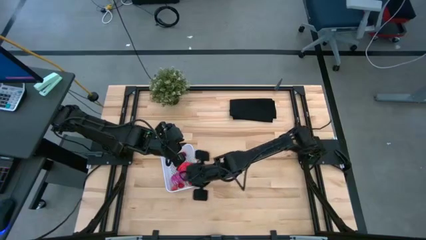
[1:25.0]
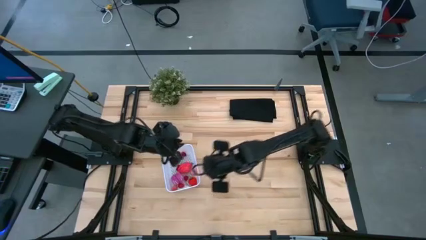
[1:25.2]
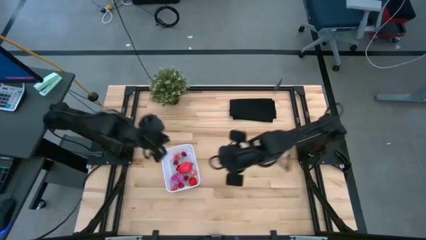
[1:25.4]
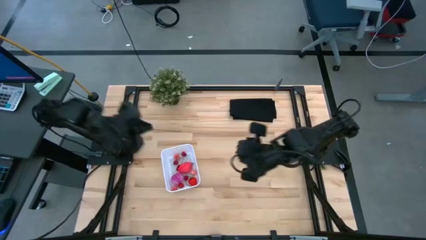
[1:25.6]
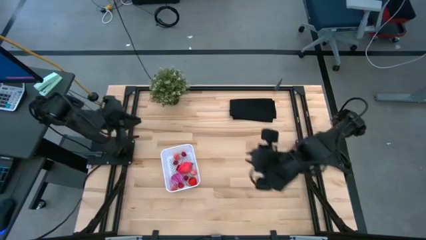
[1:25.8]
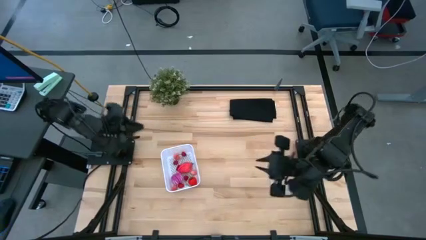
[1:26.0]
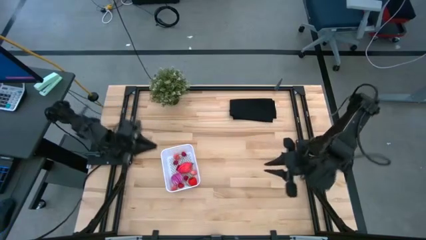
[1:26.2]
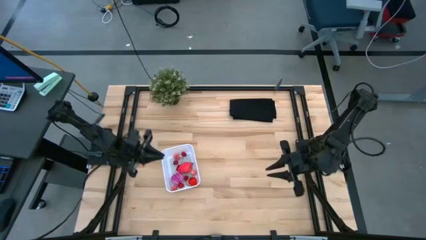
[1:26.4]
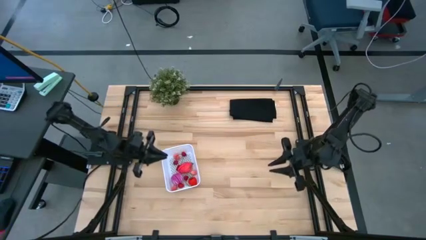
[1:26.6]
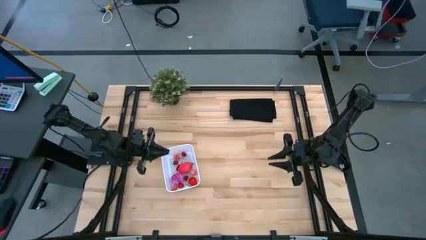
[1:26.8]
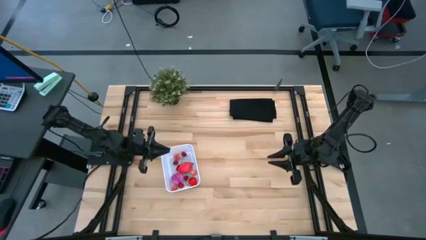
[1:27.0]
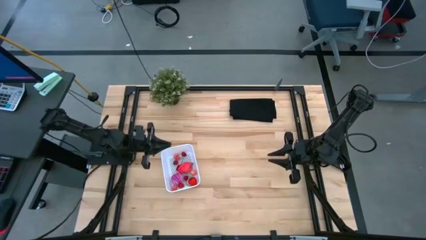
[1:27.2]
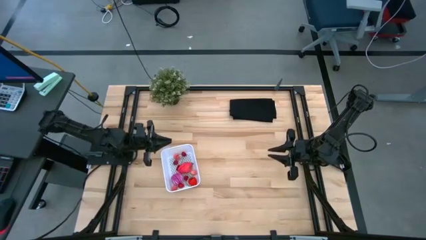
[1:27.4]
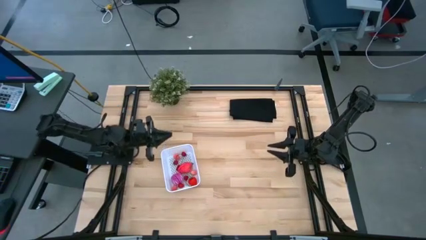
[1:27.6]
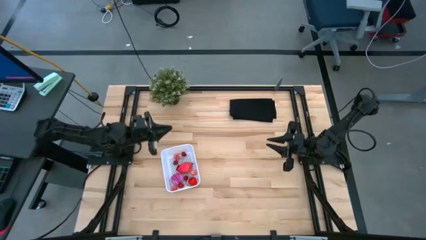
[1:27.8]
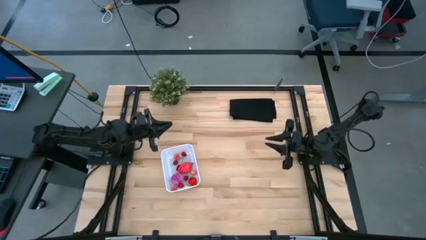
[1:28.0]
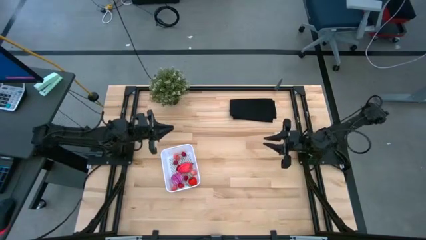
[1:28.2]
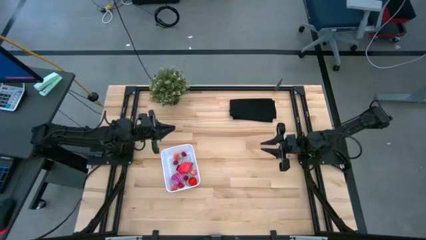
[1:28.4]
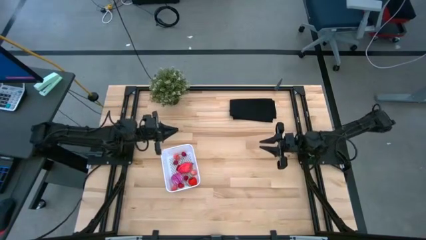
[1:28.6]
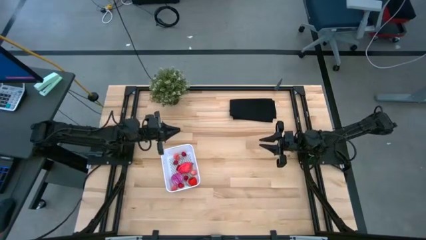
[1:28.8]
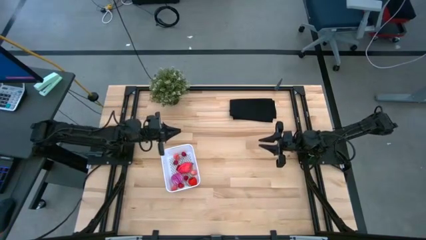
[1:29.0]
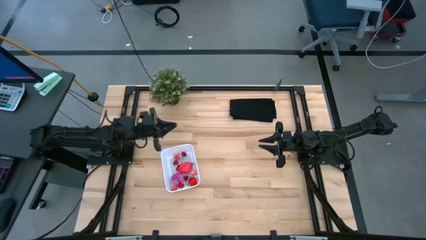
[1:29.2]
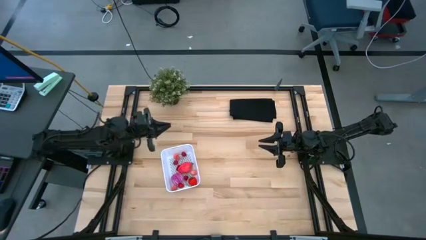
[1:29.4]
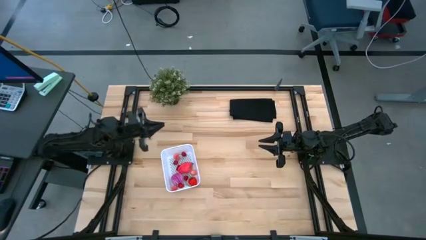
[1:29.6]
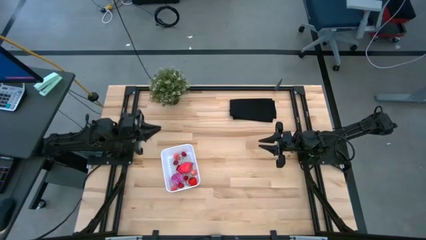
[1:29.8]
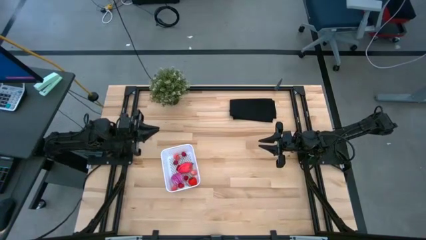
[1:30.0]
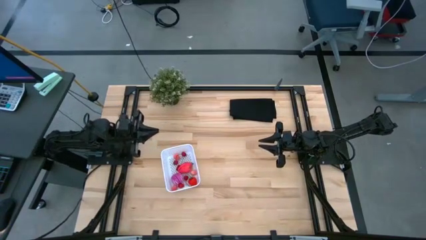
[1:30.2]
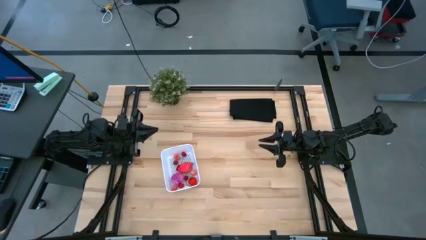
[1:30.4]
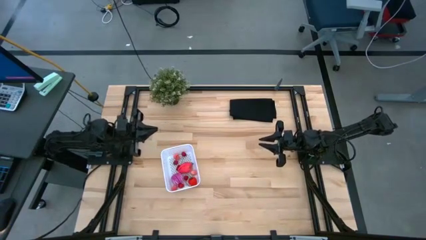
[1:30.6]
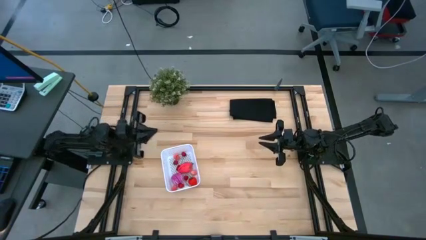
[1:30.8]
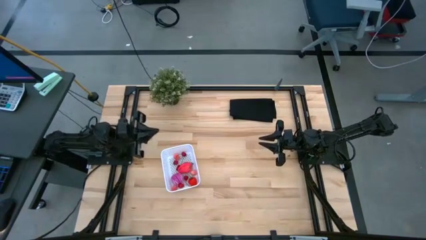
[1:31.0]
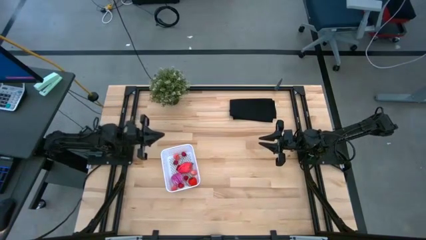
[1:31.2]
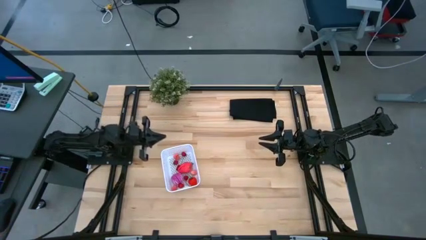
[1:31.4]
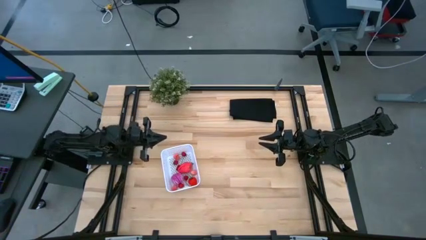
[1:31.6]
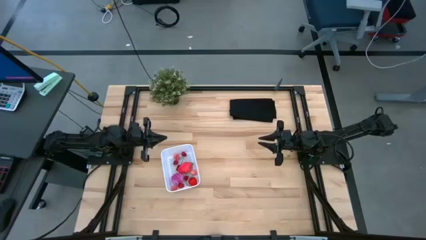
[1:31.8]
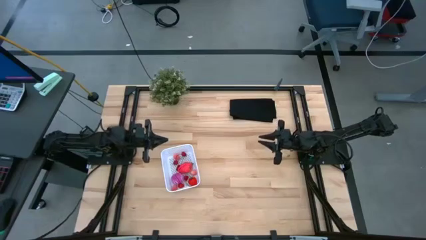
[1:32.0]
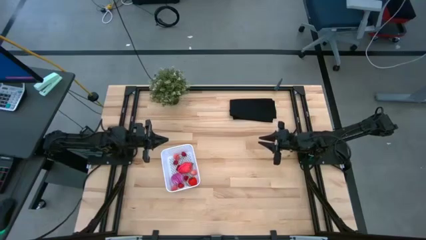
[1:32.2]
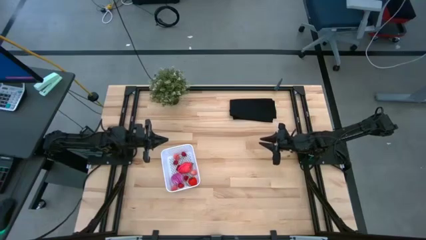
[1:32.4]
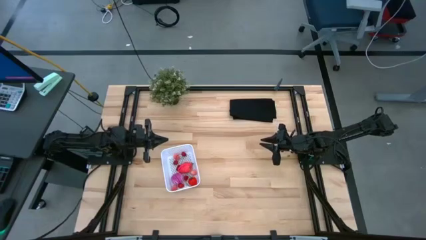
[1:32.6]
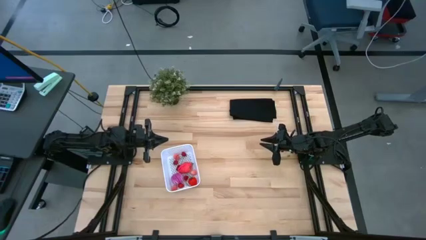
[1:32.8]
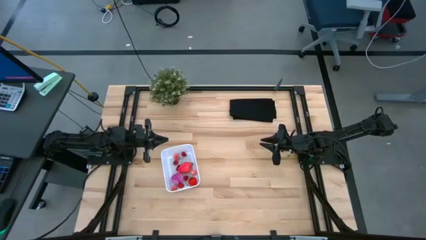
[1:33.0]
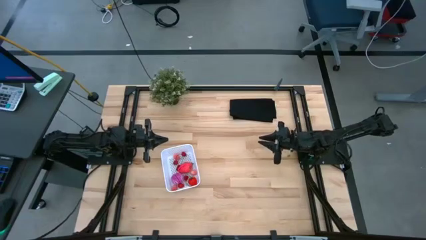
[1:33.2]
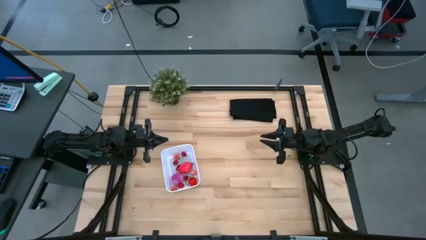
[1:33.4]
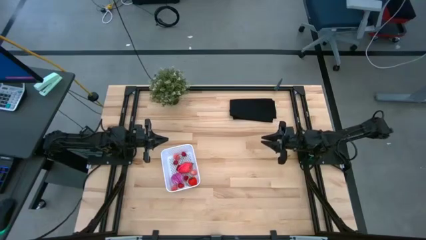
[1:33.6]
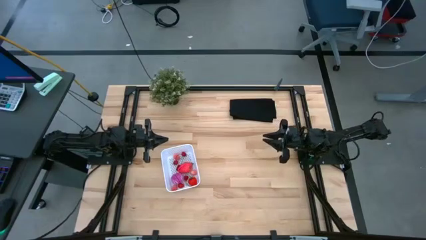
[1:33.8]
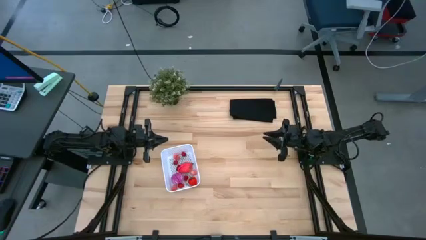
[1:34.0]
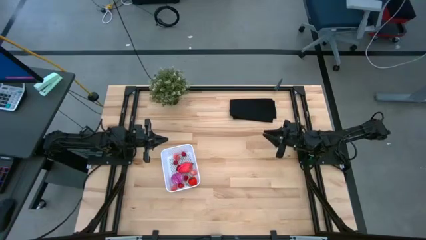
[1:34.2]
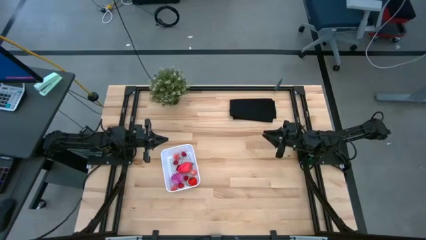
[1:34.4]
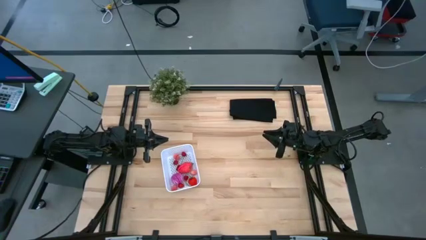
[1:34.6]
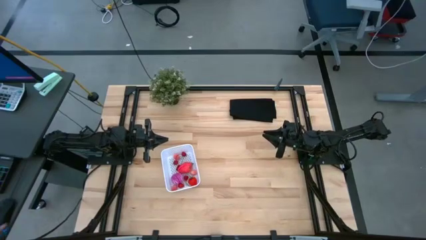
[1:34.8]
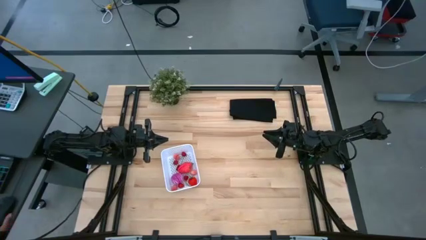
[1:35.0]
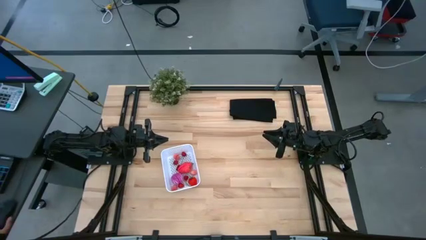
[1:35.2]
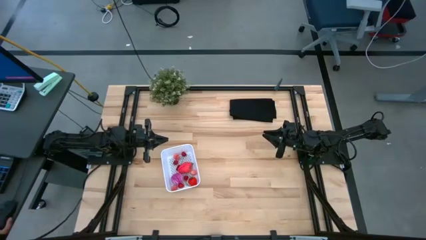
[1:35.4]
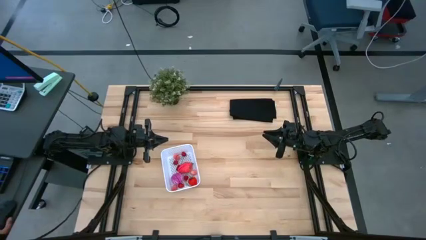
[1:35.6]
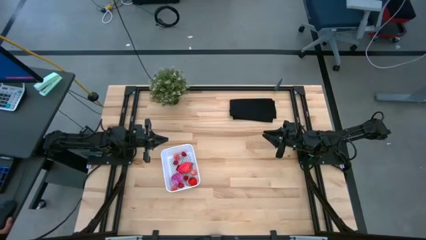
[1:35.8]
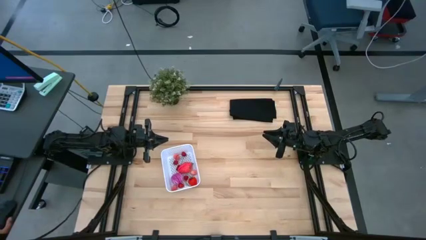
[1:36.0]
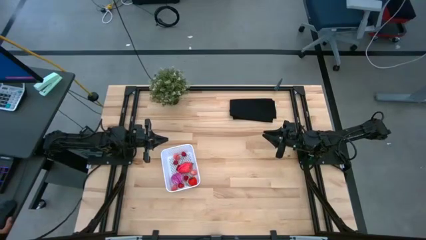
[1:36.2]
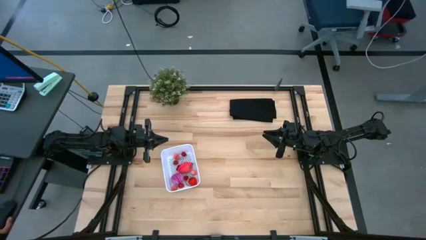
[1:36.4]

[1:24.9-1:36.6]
Task: Pick and placing Produce into tupperware
Return to Home Position

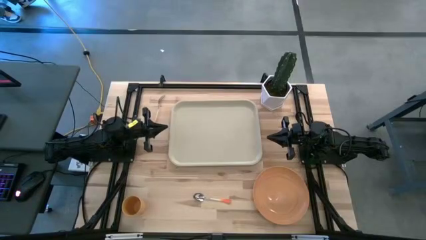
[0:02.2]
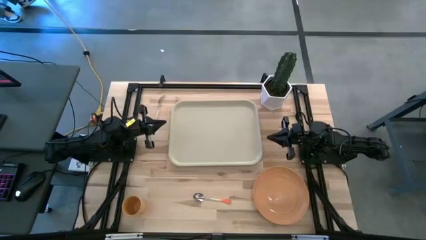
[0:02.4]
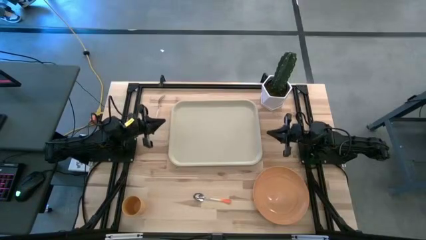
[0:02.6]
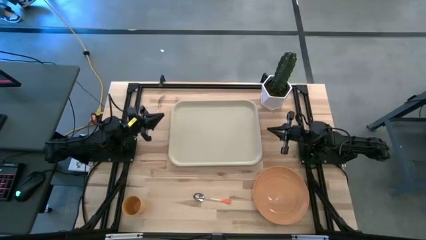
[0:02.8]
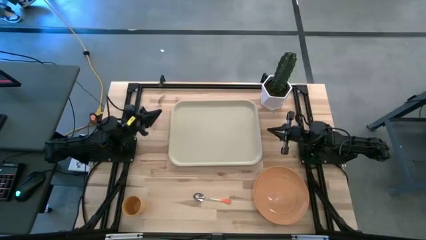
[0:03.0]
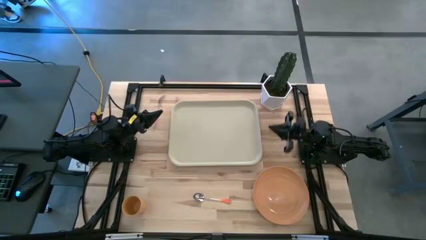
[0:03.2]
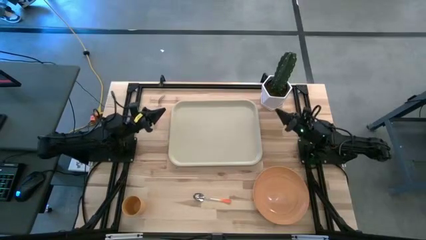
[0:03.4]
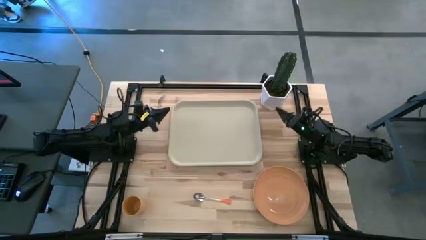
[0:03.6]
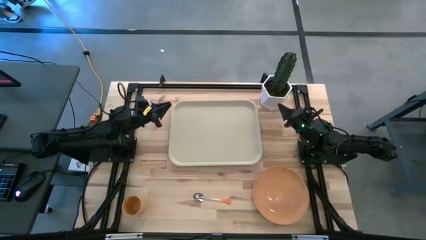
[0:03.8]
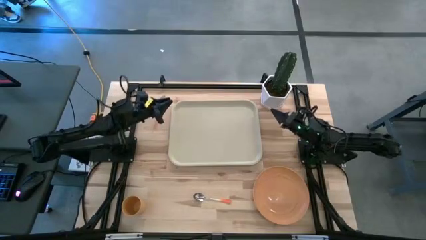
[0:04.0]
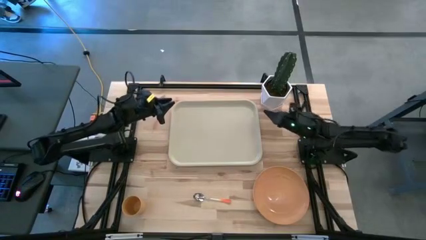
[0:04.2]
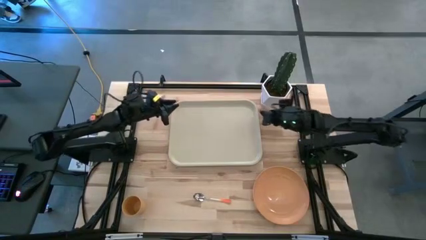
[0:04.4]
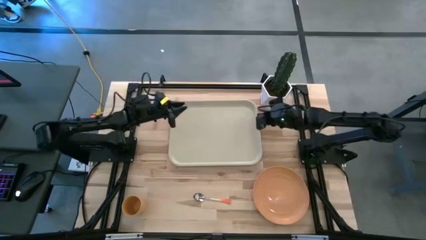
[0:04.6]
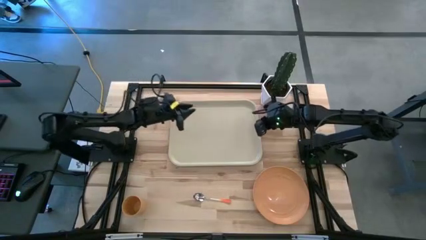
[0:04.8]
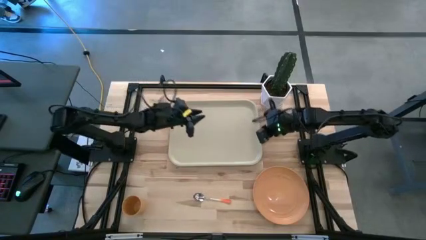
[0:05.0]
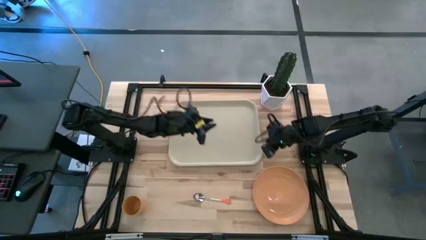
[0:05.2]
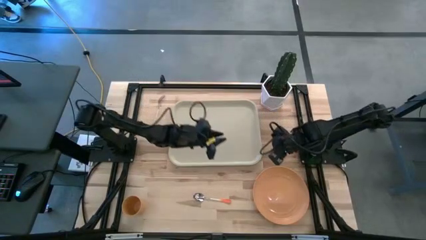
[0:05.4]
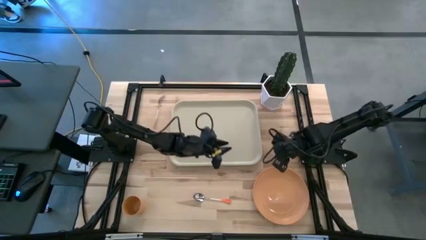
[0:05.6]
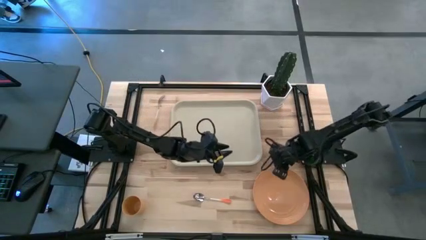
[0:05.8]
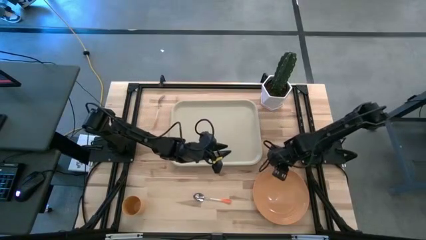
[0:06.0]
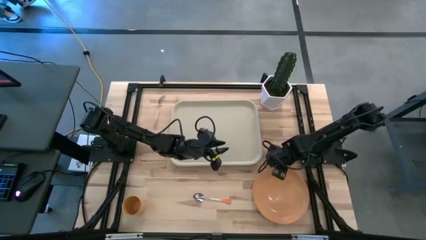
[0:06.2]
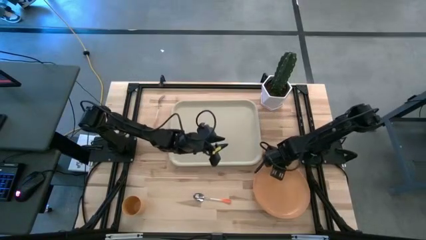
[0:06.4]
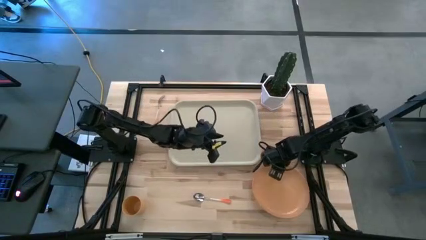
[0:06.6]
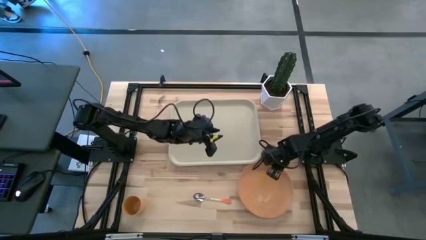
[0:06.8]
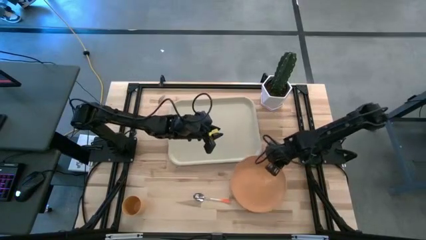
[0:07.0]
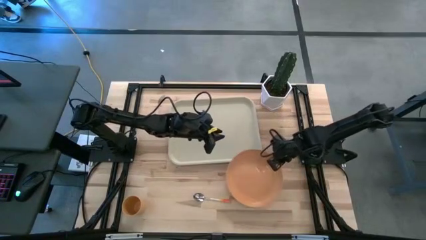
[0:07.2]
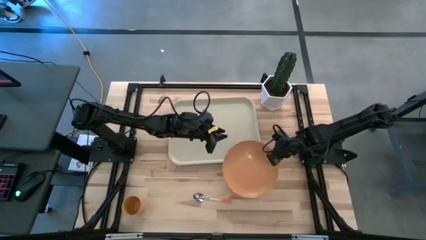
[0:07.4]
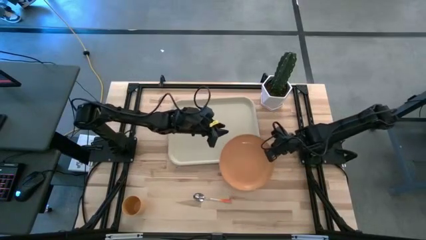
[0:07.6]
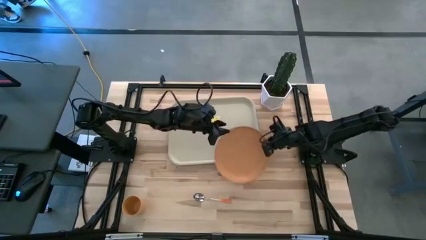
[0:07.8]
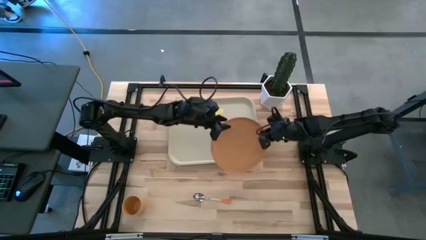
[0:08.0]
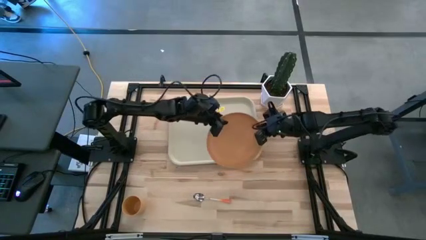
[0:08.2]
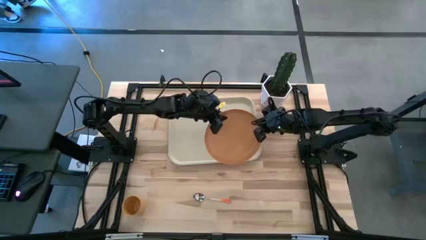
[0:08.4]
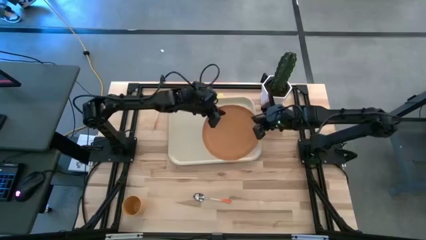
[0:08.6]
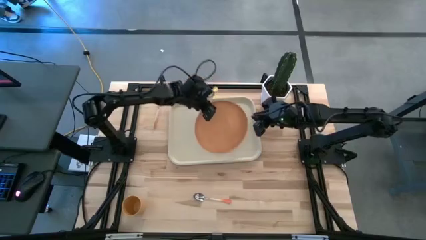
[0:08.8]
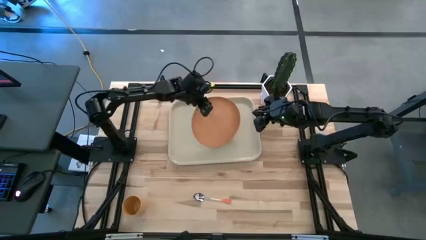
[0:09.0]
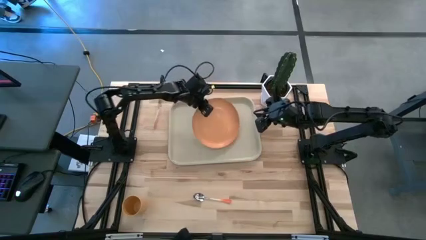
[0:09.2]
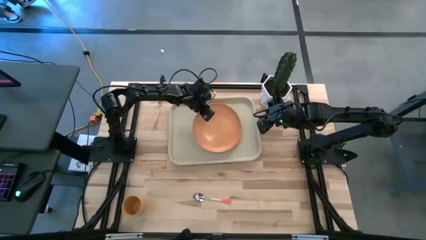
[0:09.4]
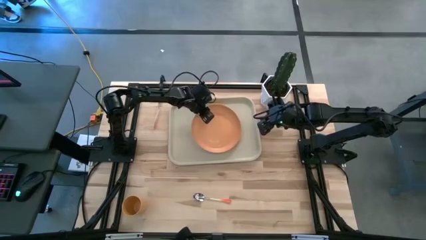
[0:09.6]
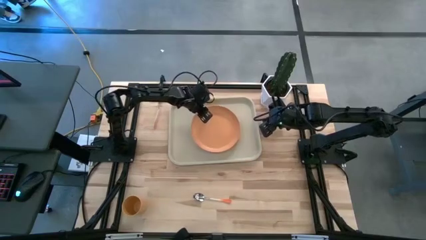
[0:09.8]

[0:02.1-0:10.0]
Task: Pick and place plate/cup/fork/spoon on tray
Put the orange plate on the gray tray
